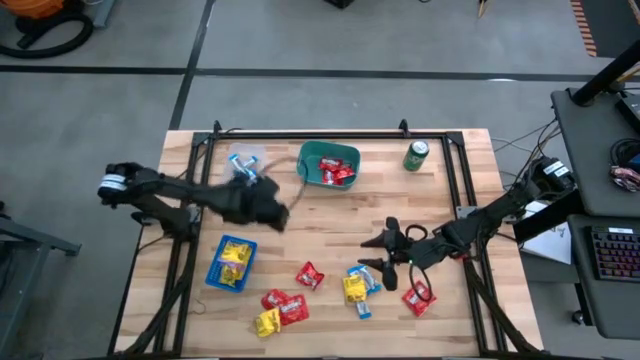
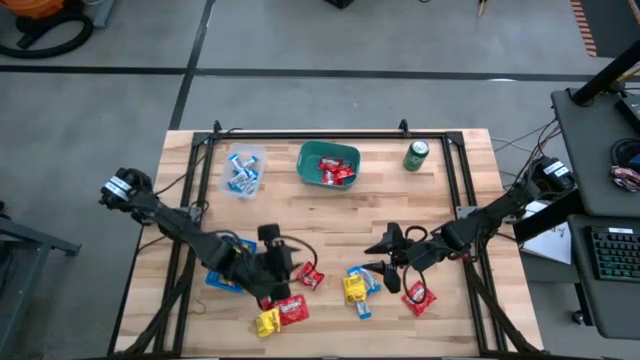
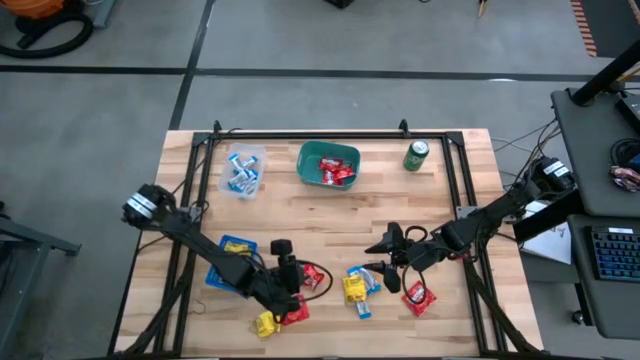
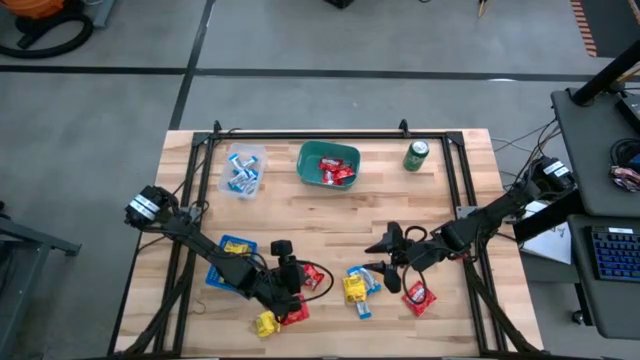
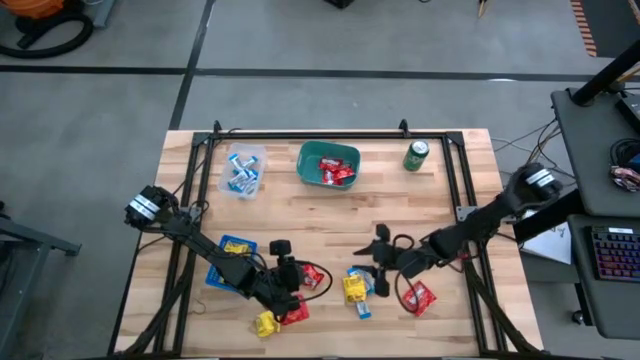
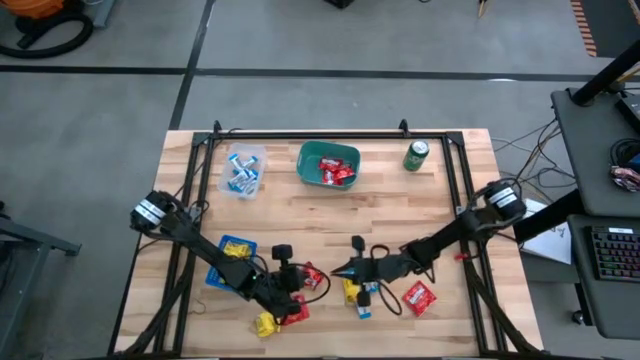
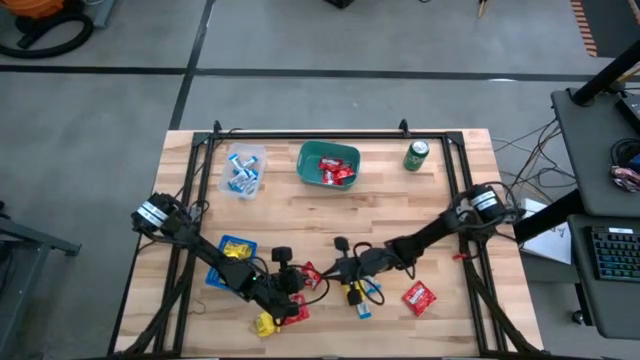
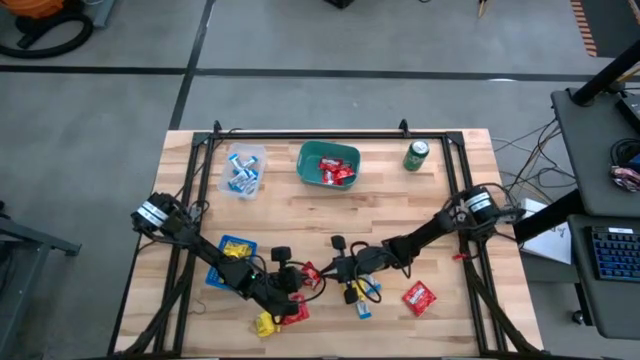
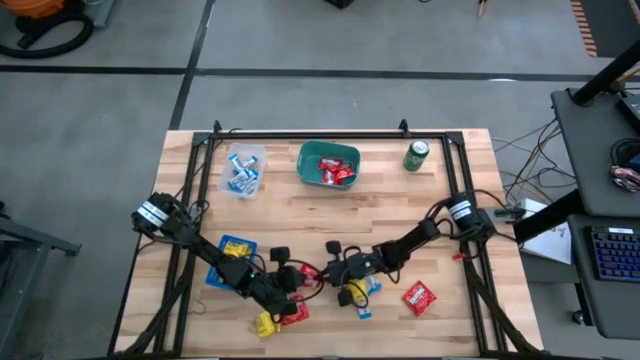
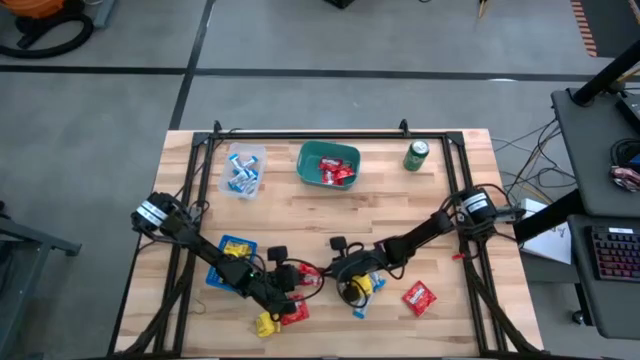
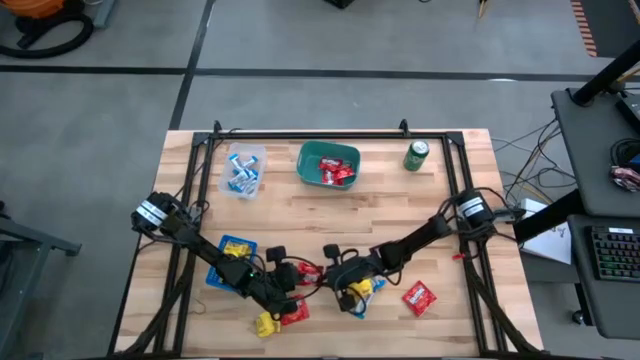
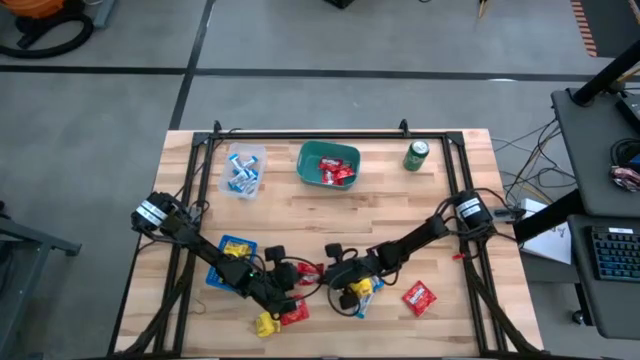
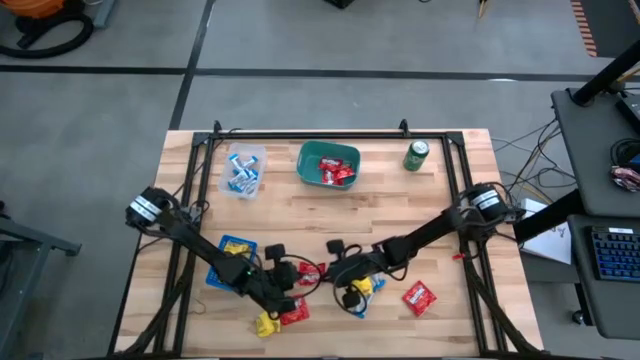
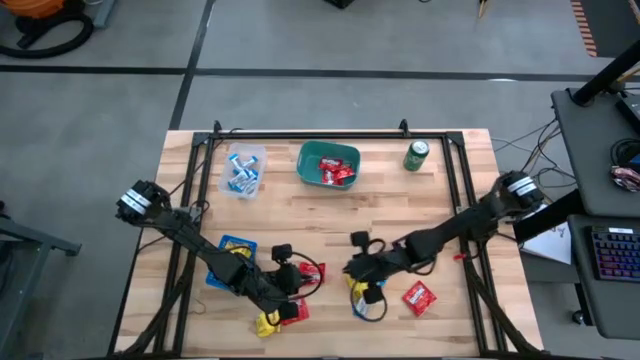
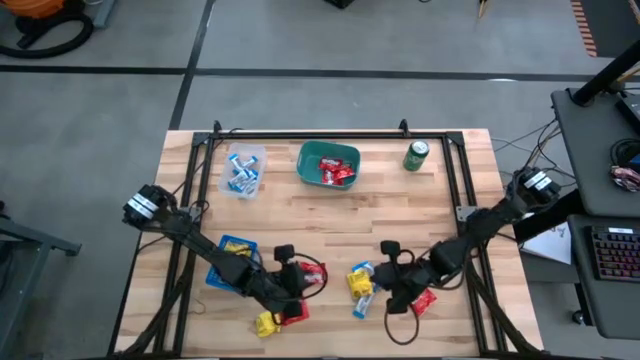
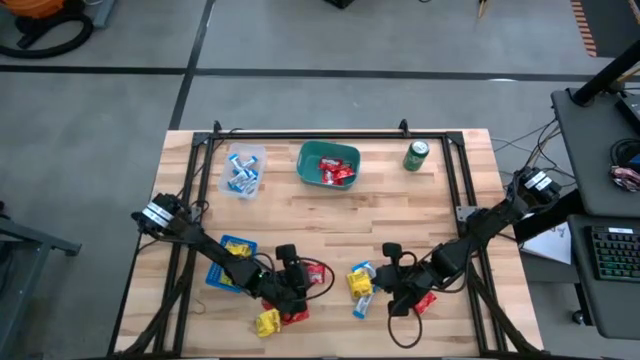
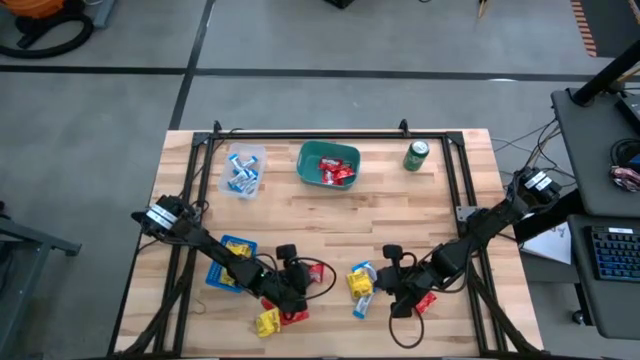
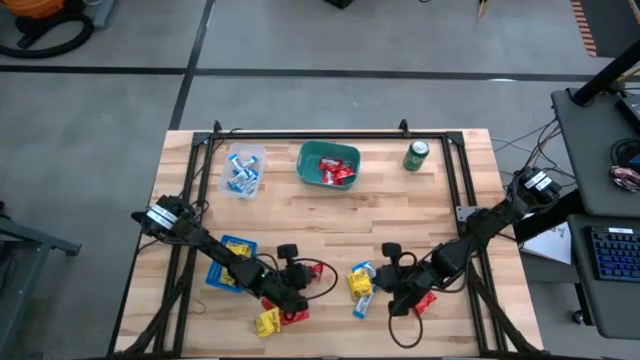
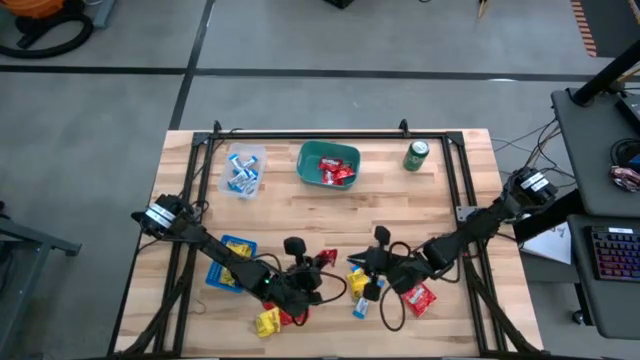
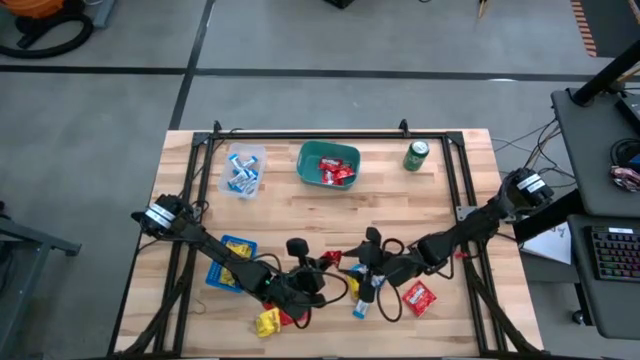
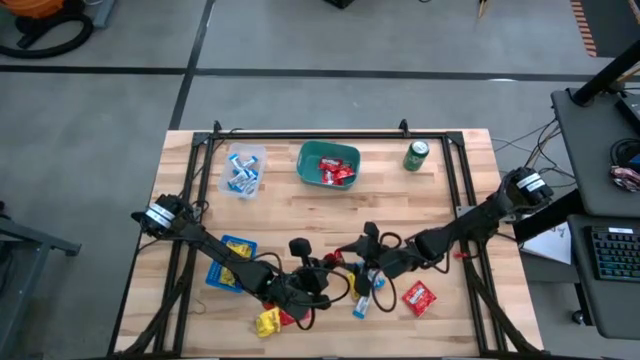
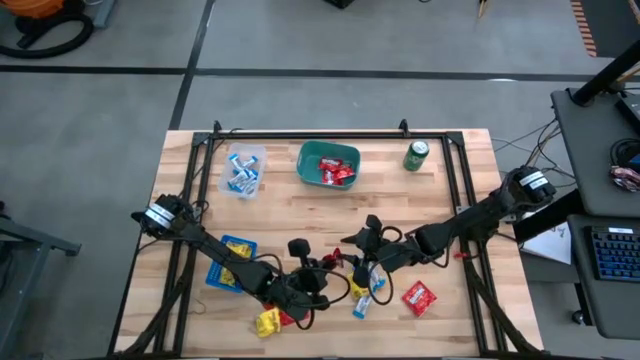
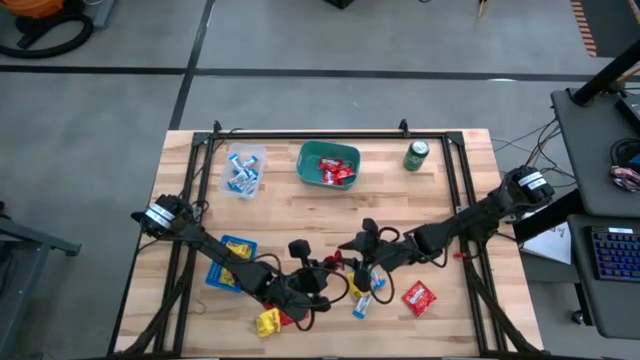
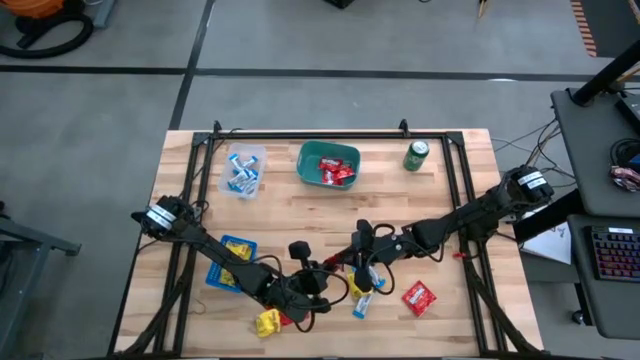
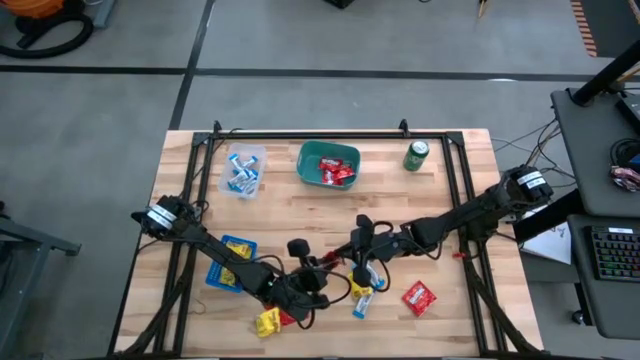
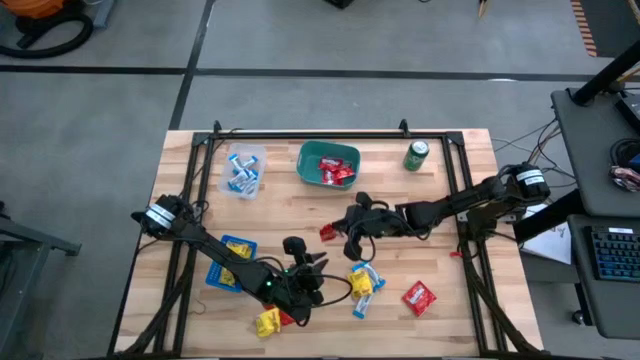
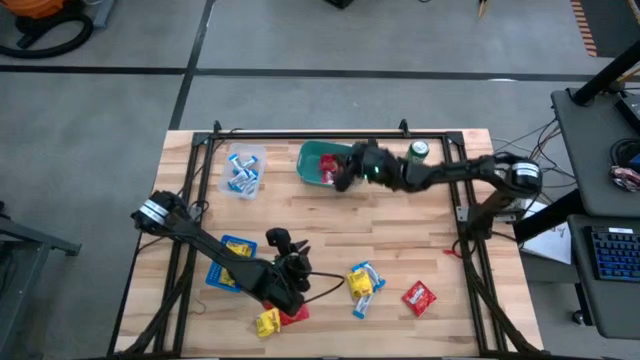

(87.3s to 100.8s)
Task: Sort candy
Put the red candy into the green bin

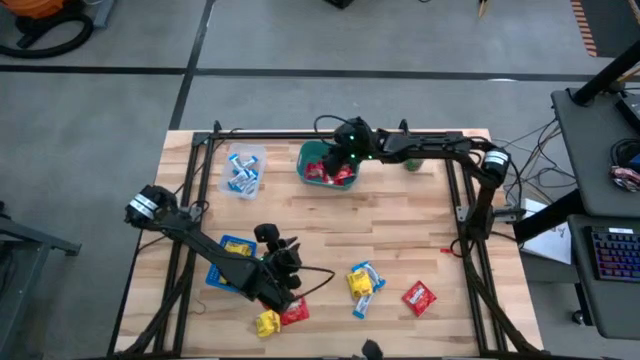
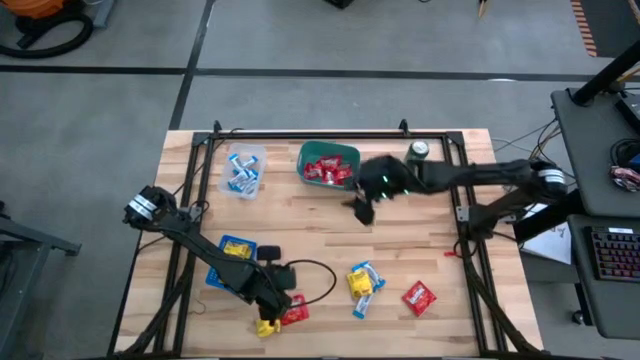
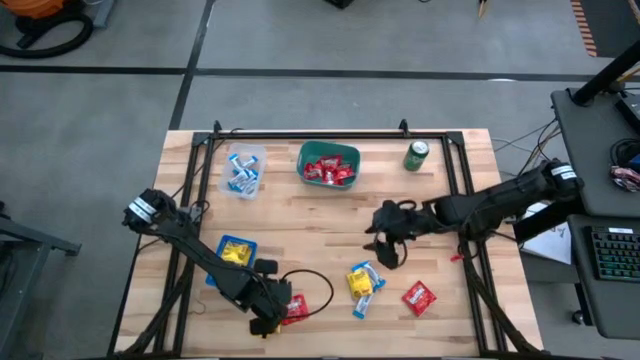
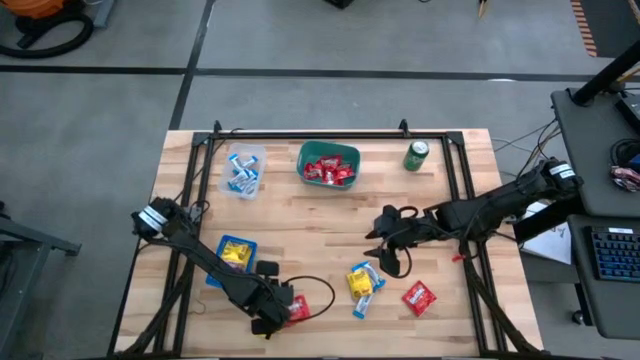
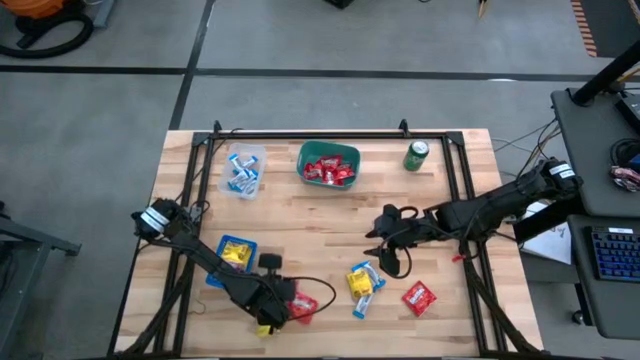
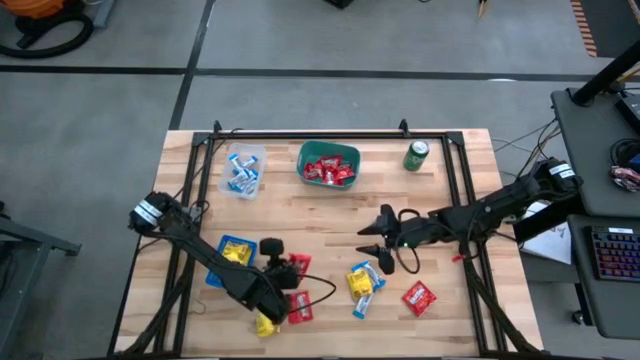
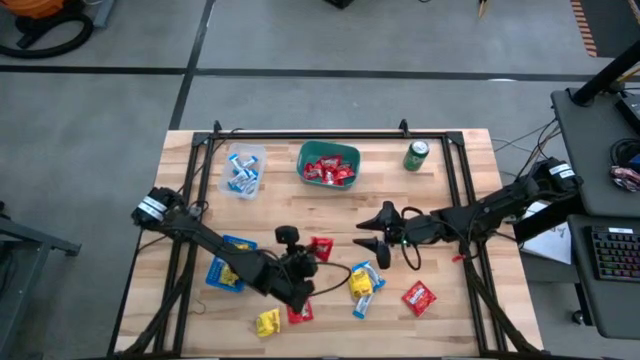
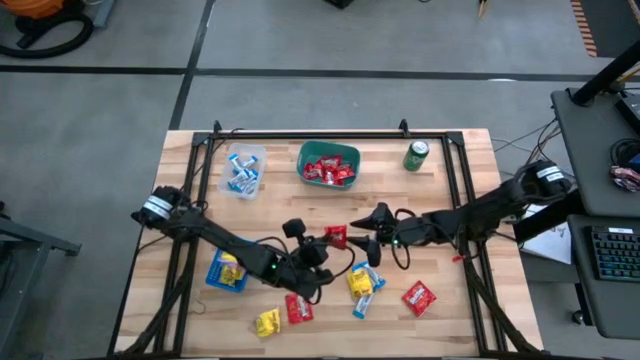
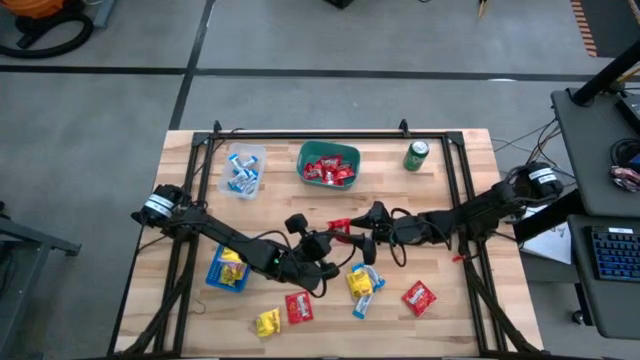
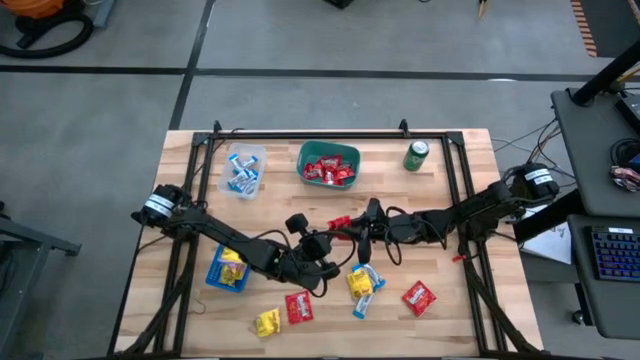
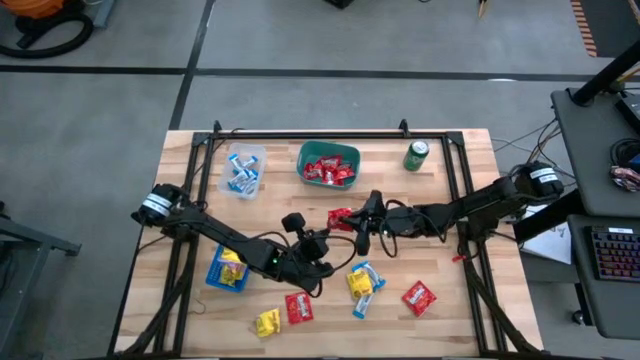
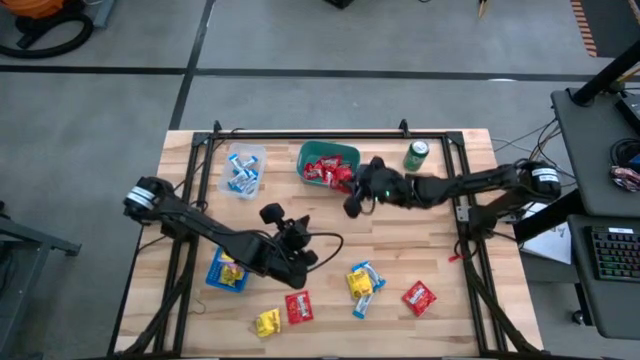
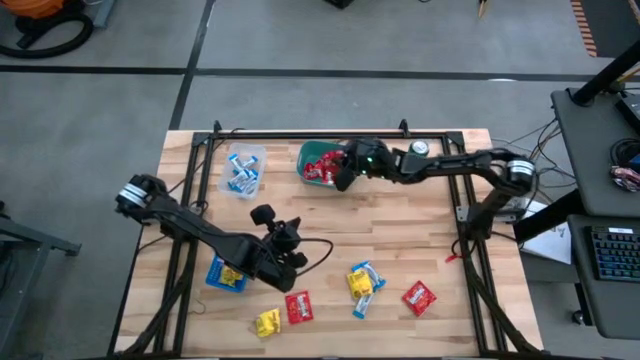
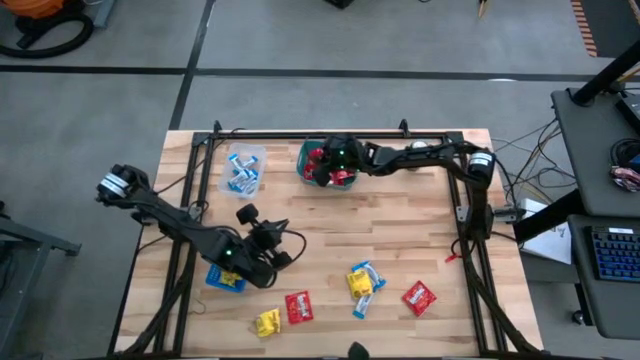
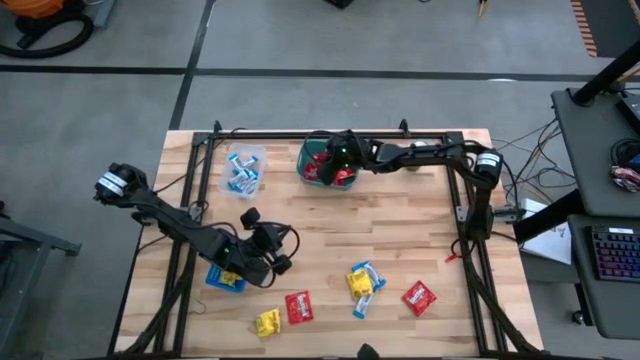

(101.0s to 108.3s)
Put the red candy into the green bin
